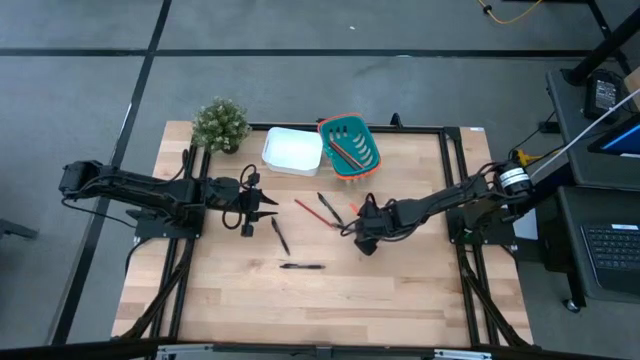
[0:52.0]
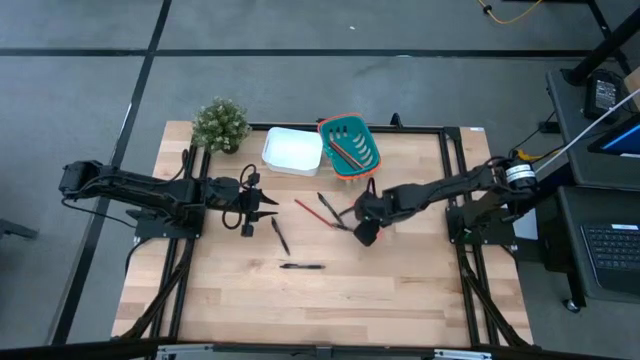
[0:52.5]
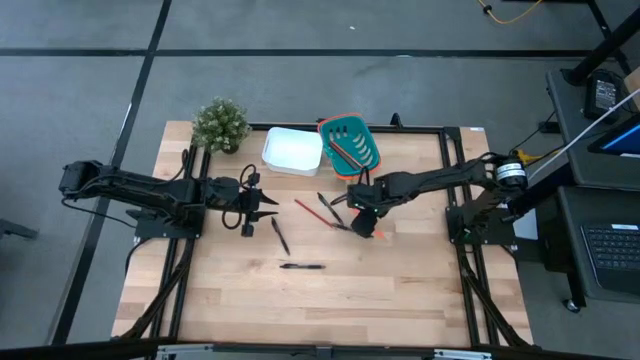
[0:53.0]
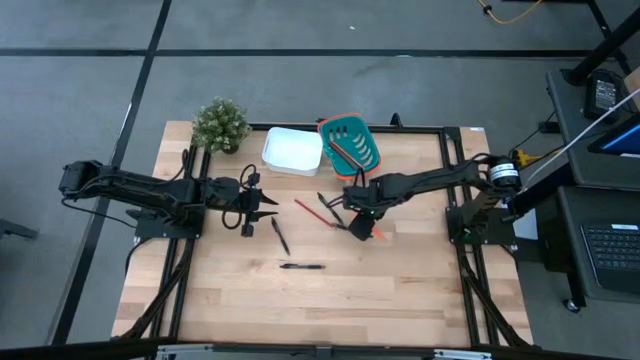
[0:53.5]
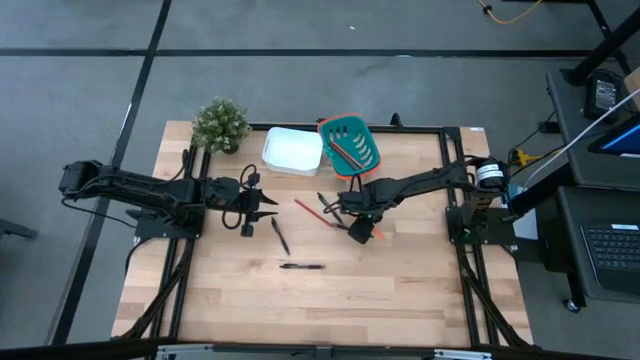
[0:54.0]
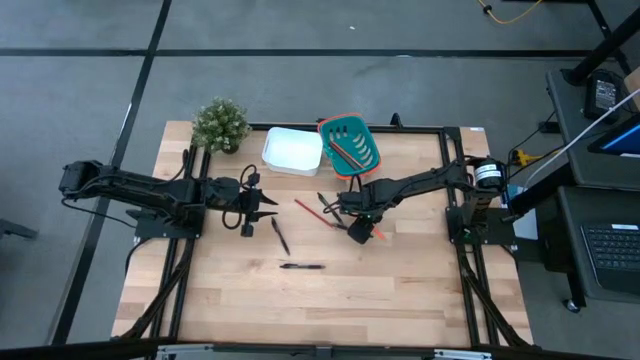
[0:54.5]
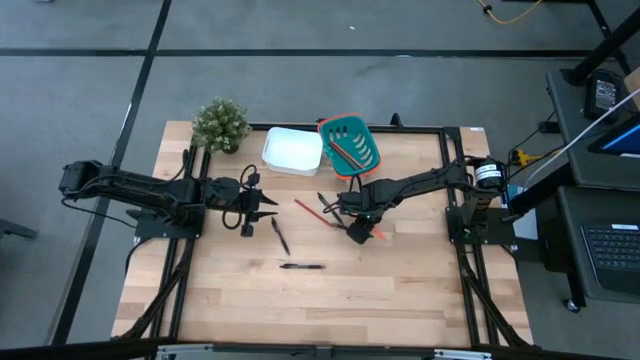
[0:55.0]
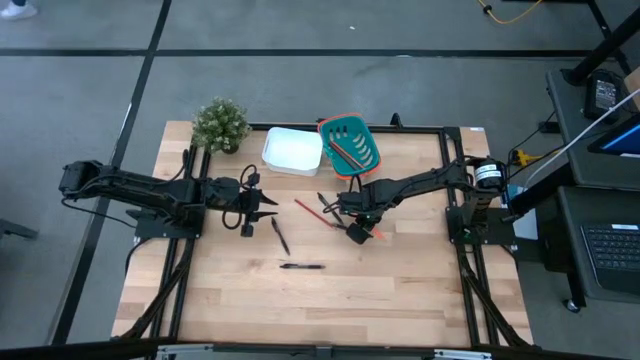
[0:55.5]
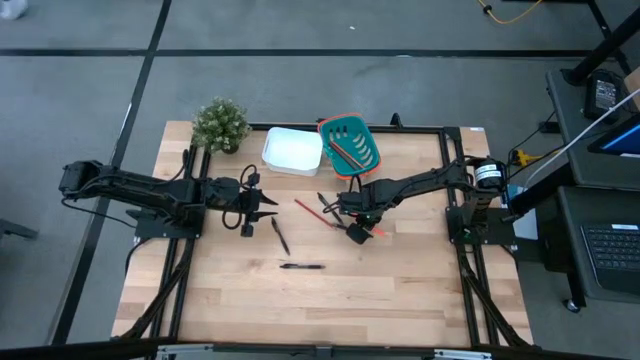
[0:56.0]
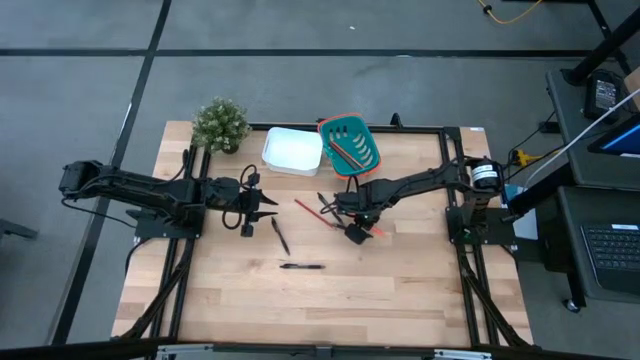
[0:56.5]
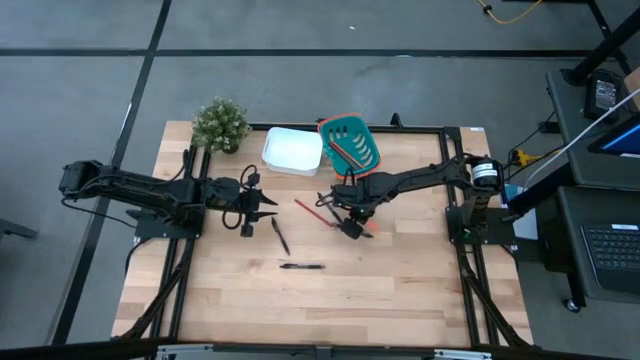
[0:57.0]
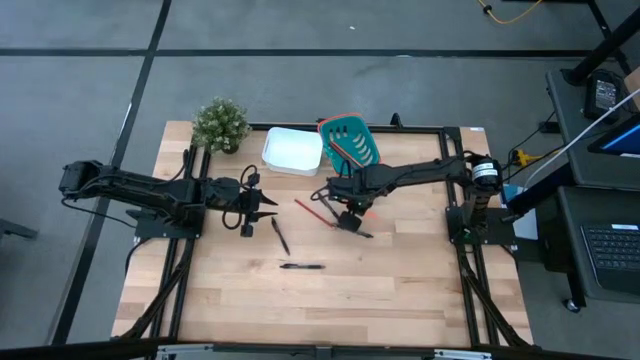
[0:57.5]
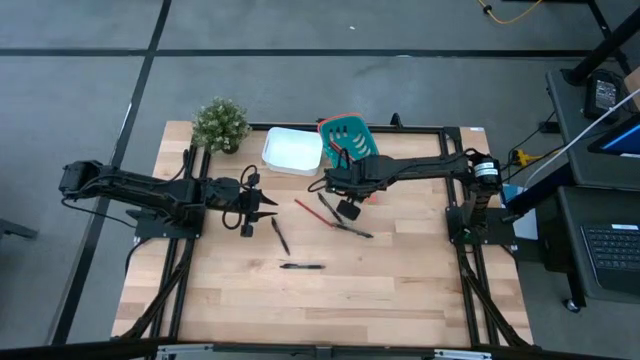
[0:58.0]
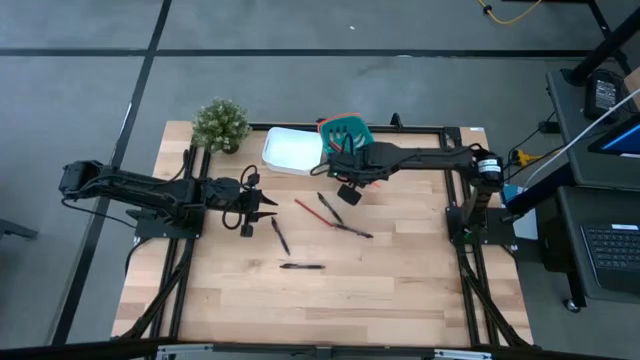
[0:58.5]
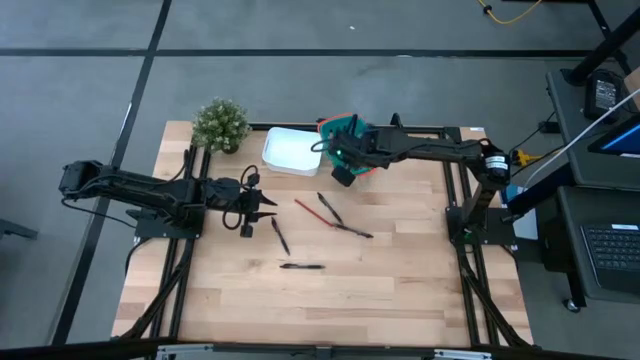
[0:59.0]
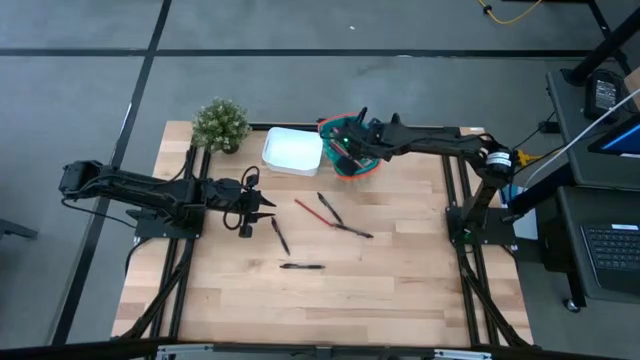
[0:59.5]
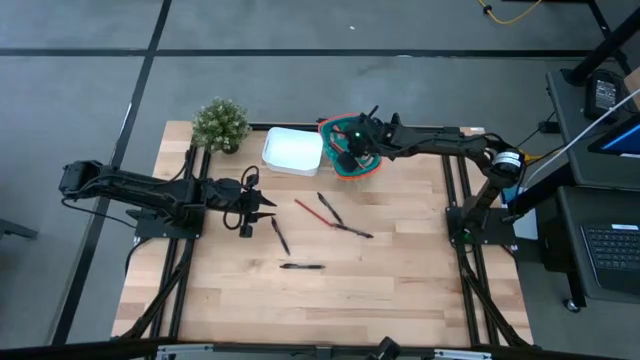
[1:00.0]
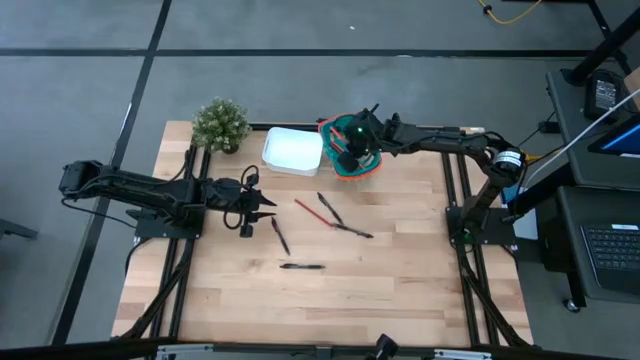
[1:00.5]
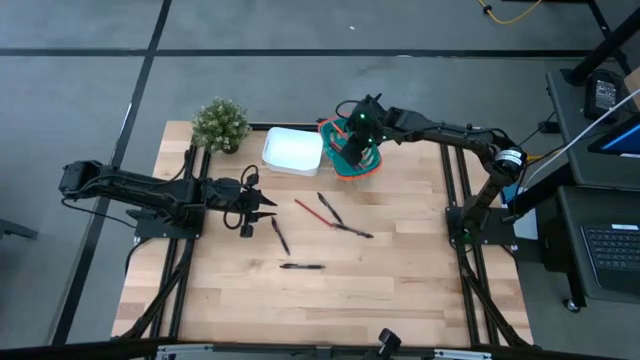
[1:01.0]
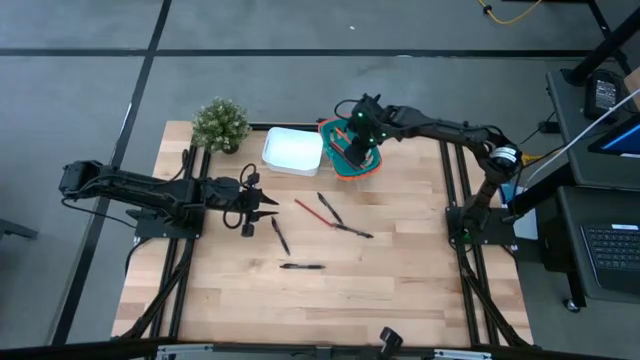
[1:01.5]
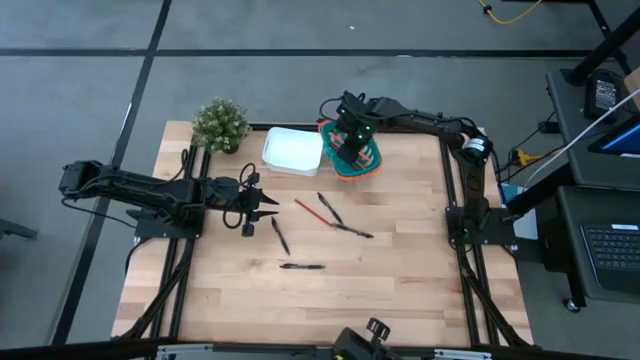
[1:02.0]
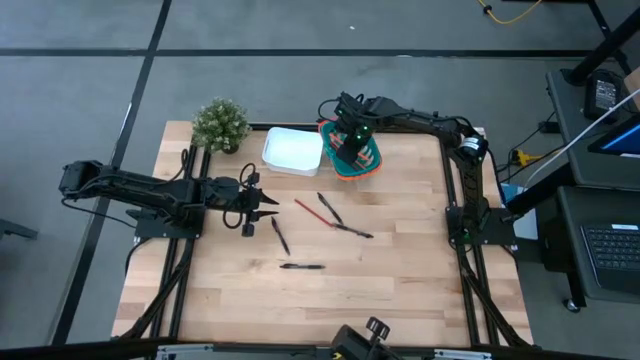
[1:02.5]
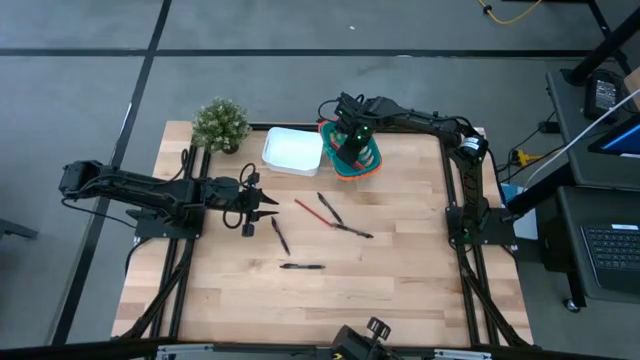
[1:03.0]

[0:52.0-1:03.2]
Task: Sort pens & pencils
Put the orange pencil into the dark green bin

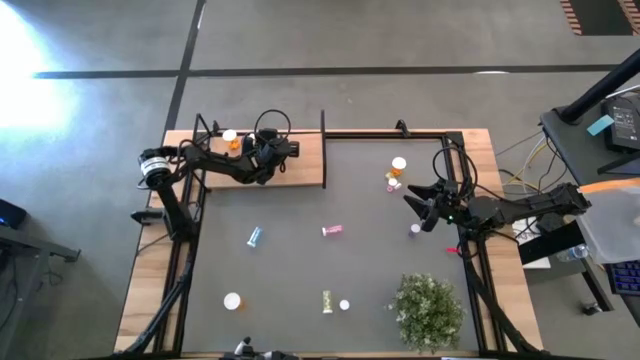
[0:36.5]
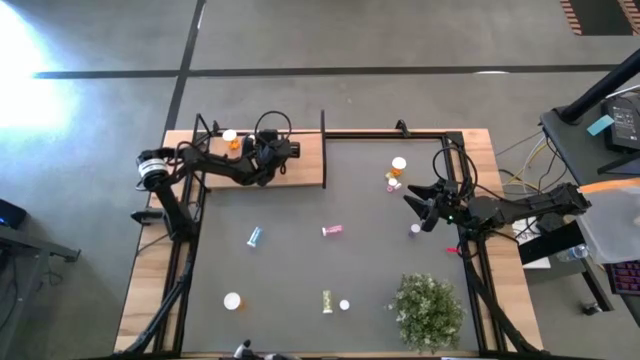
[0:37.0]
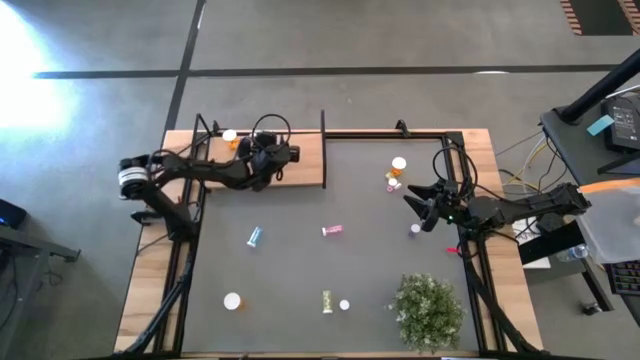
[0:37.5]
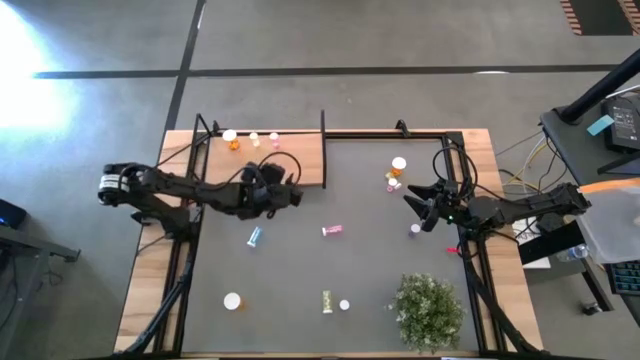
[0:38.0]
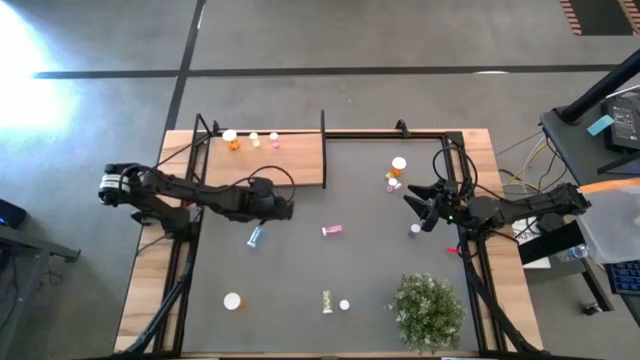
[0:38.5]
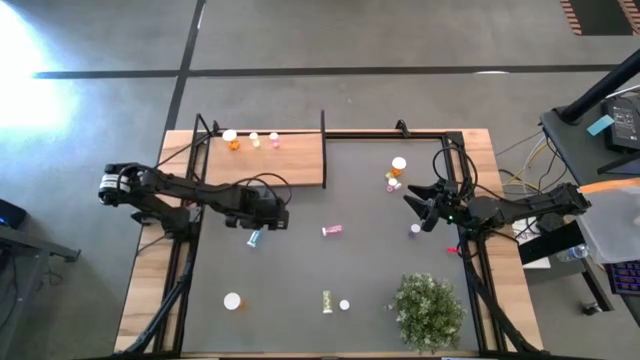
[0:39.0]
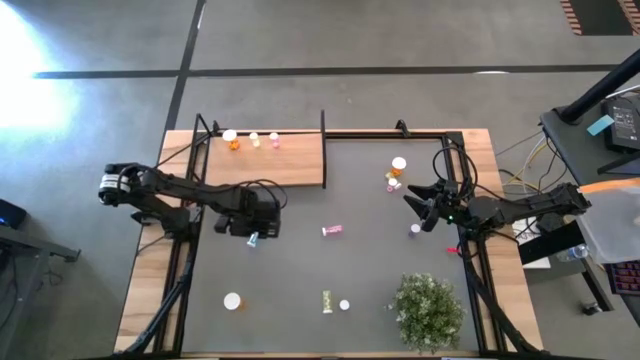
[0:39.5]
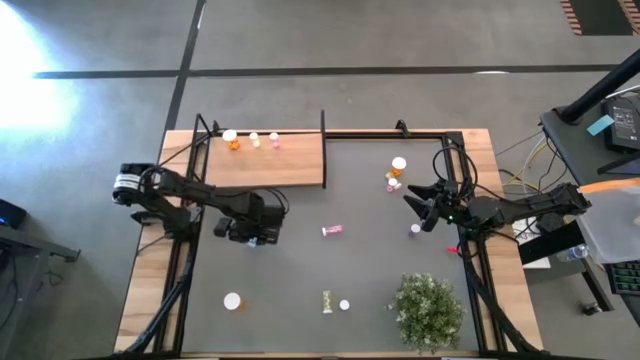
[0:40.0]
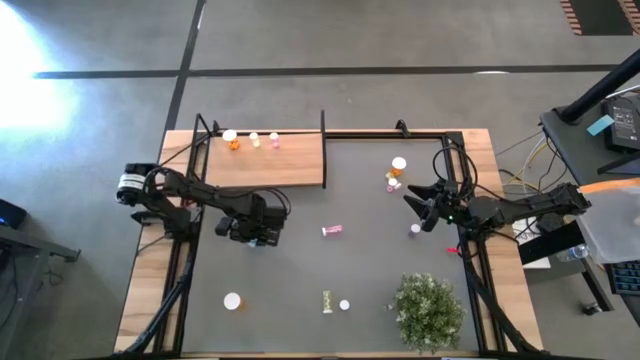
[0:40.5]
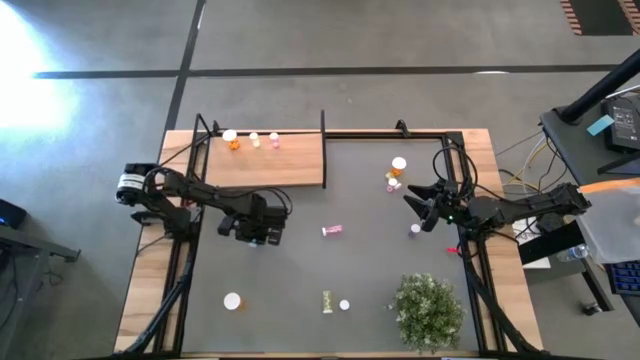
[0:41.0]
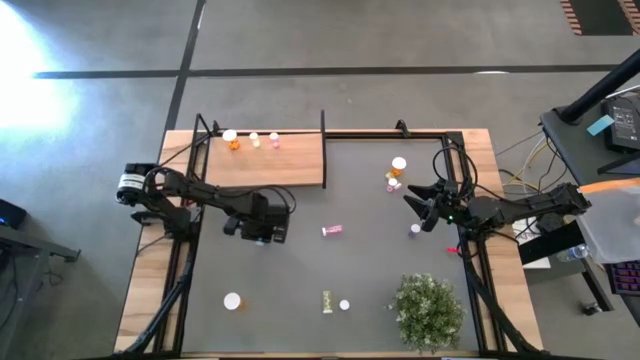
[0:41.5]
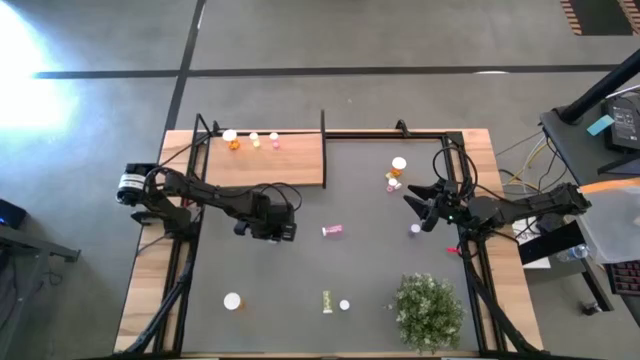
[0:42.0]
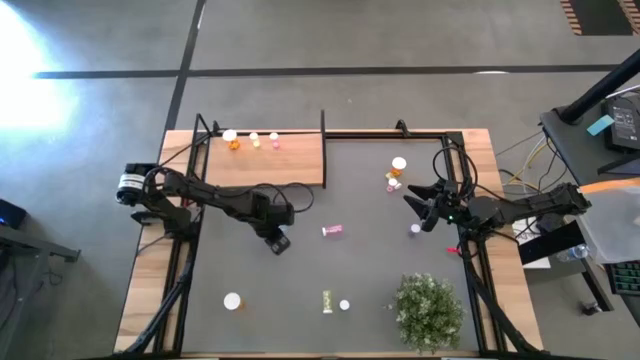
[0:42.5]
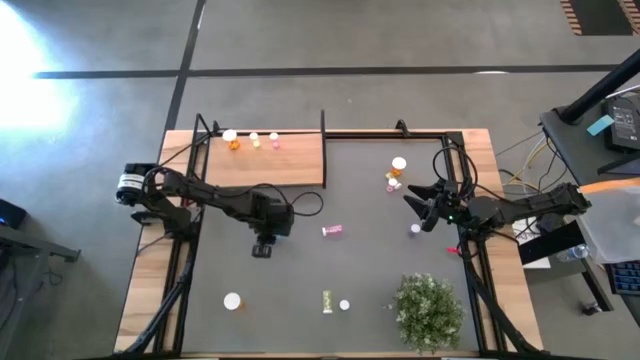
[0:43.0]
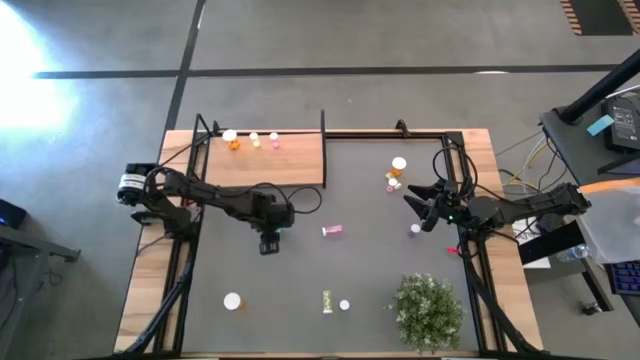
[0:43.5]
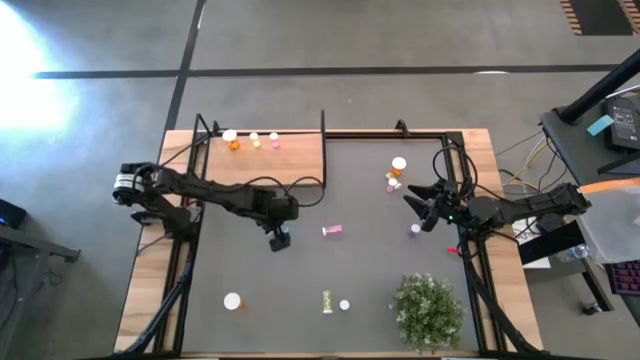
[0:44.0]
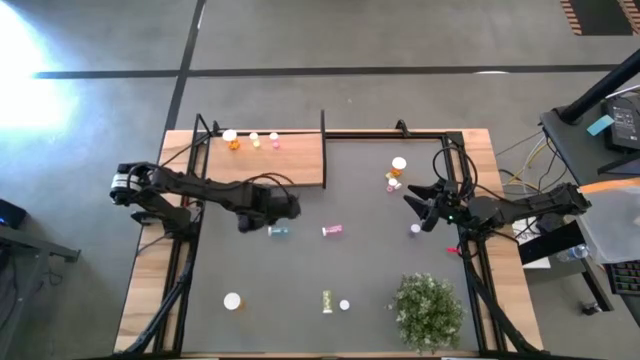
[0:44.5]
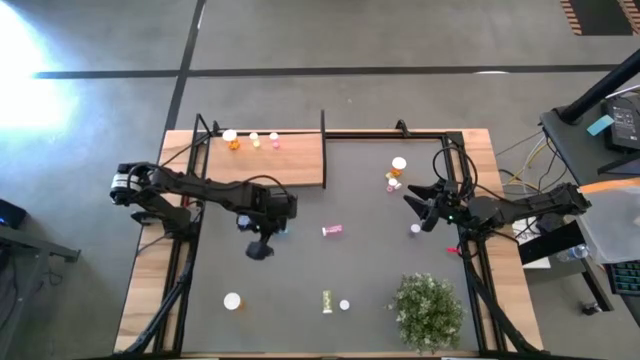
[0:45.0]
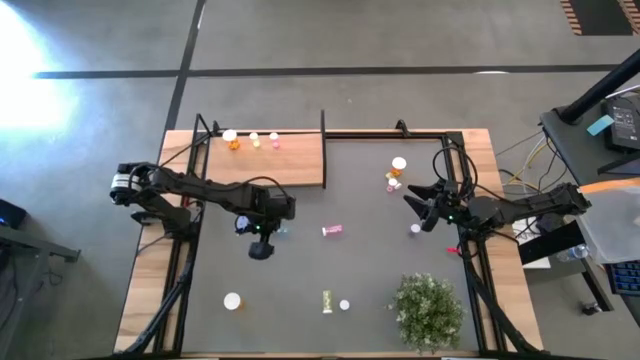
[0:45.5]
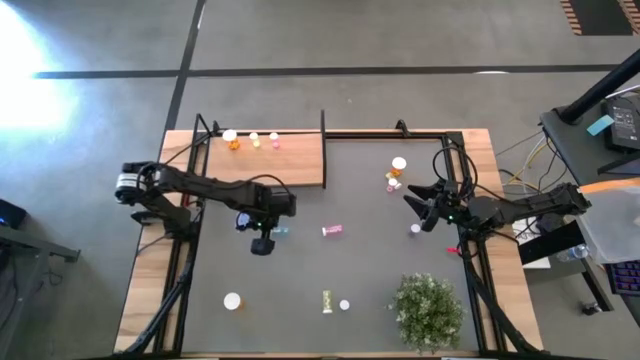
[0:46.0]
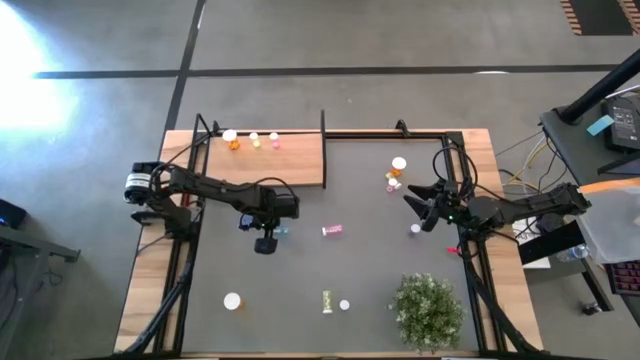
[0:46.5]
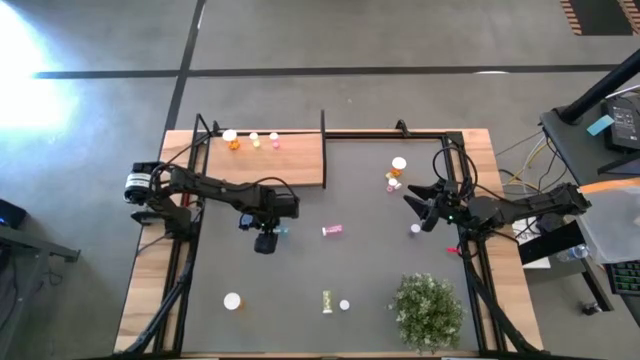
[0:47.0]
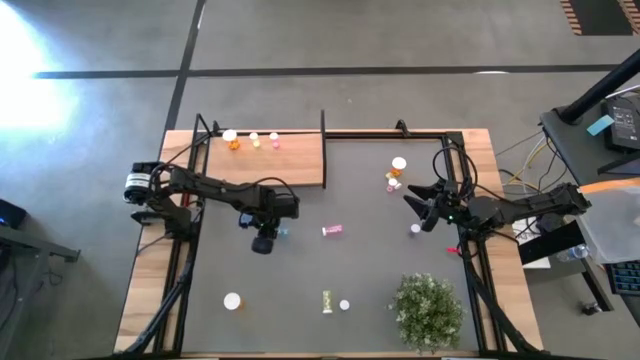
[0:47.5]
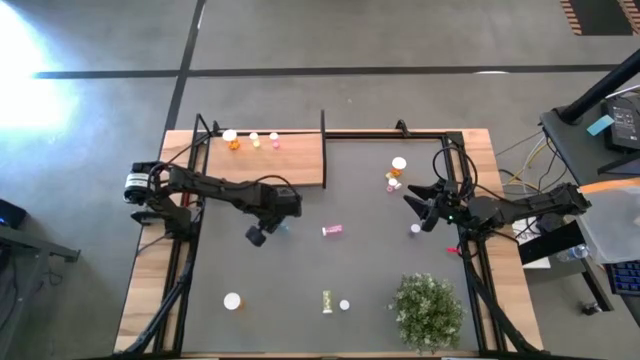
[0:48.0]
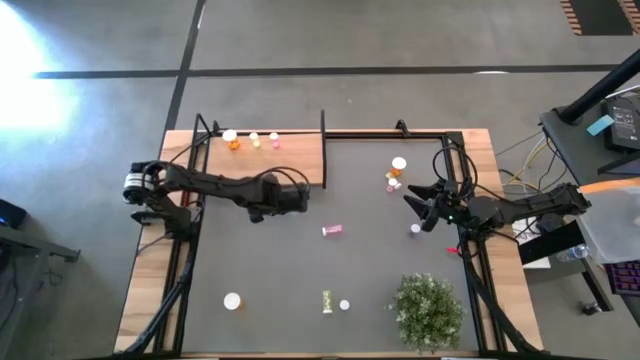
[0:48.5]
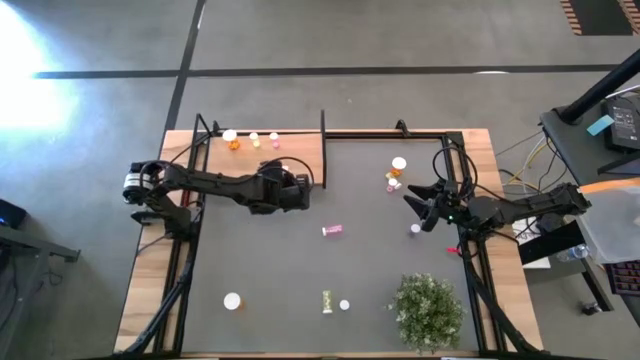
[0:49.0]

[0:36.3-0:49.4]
Task: Pick and place medicine bottles onto shelf by color
Put the top left blue pill bottle on the shelf
